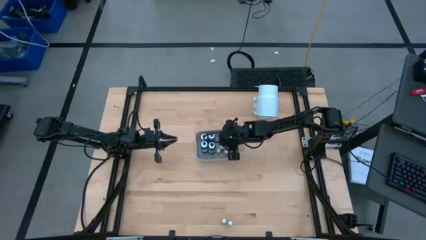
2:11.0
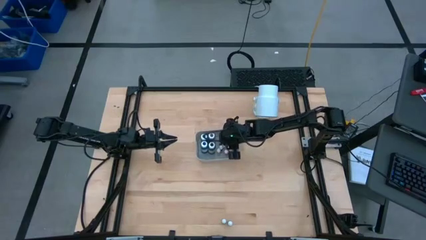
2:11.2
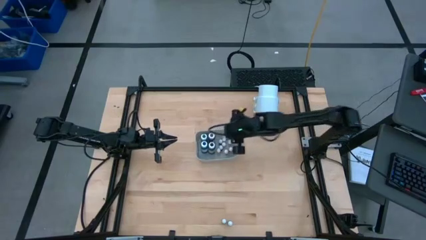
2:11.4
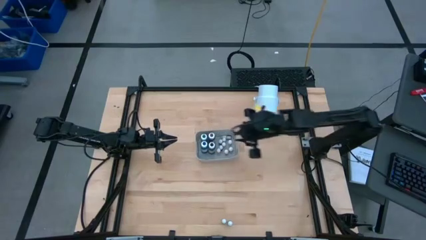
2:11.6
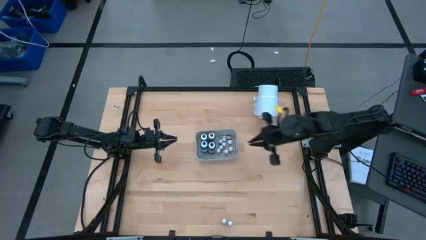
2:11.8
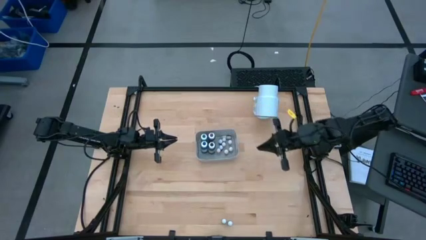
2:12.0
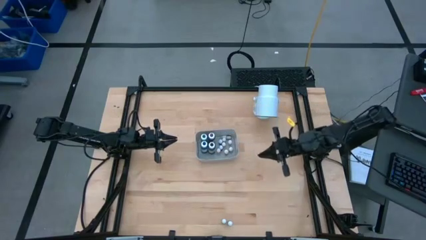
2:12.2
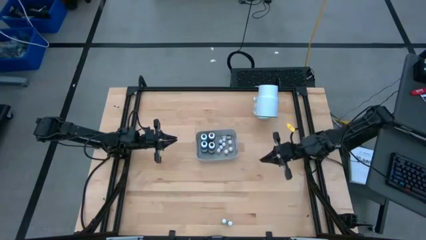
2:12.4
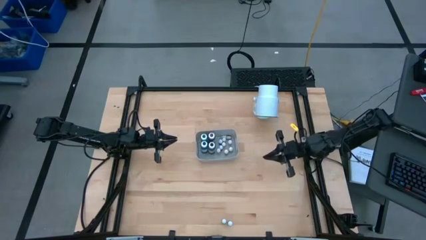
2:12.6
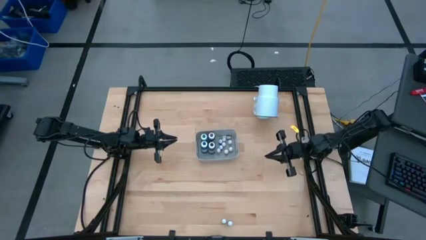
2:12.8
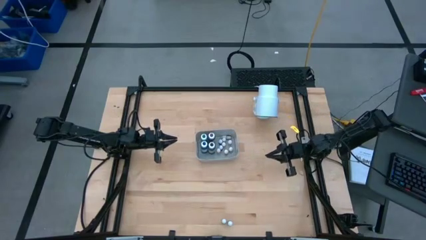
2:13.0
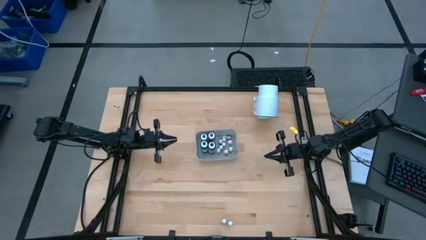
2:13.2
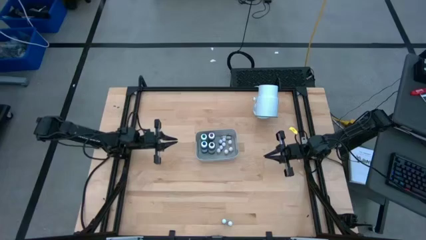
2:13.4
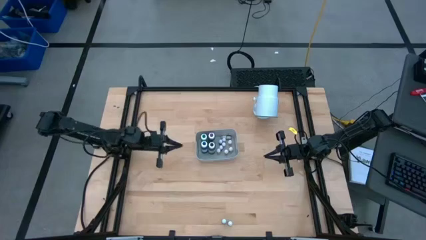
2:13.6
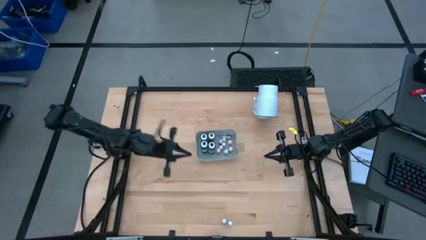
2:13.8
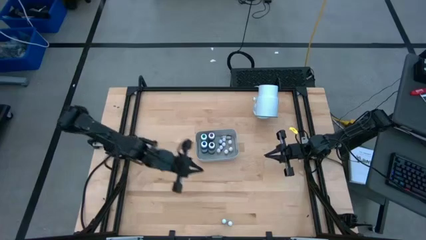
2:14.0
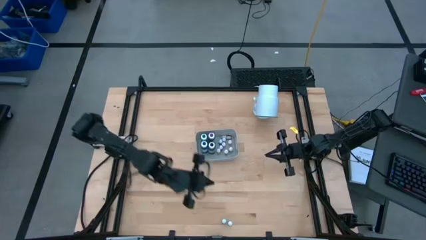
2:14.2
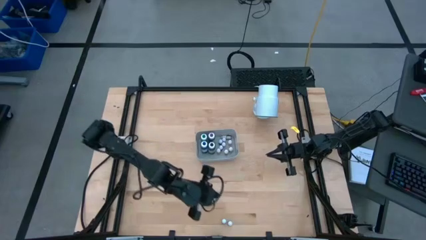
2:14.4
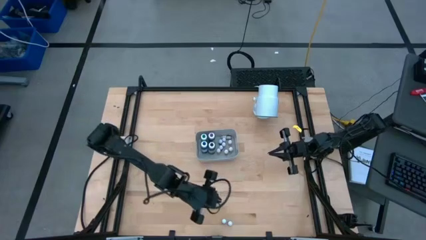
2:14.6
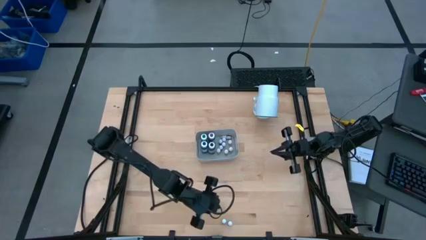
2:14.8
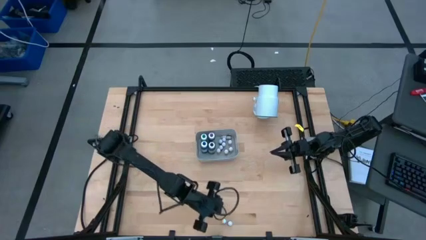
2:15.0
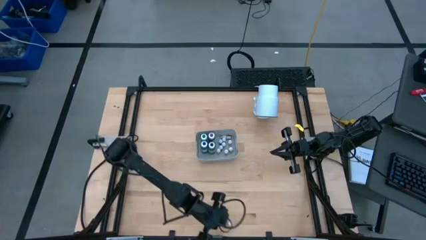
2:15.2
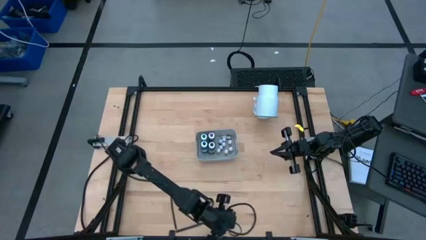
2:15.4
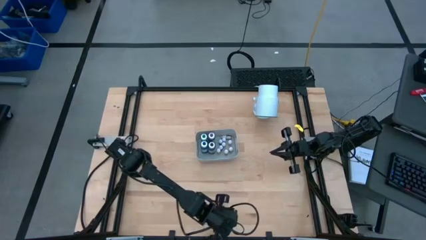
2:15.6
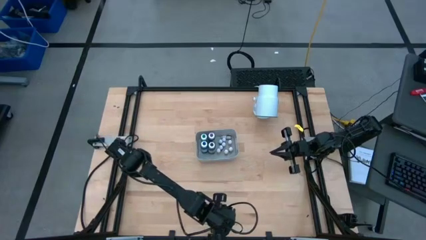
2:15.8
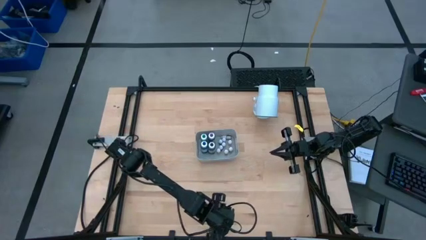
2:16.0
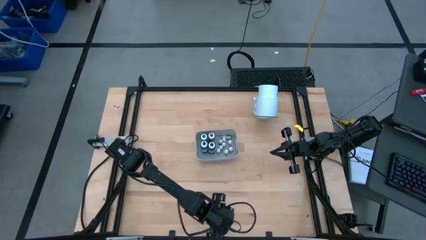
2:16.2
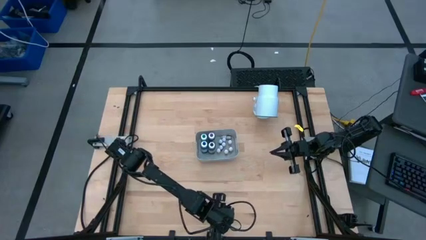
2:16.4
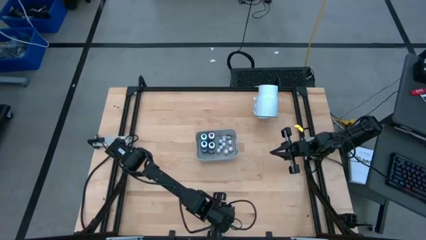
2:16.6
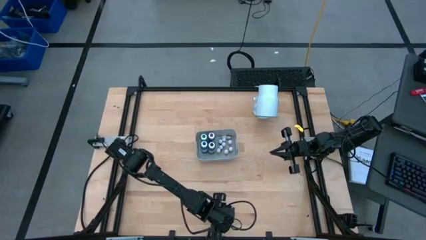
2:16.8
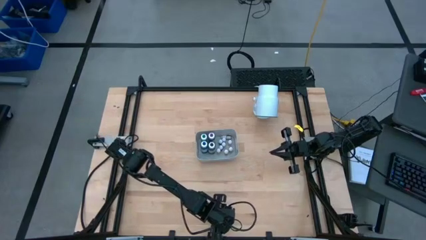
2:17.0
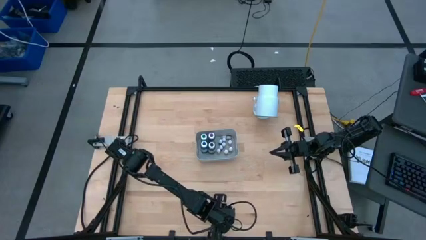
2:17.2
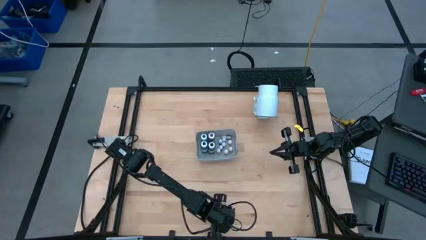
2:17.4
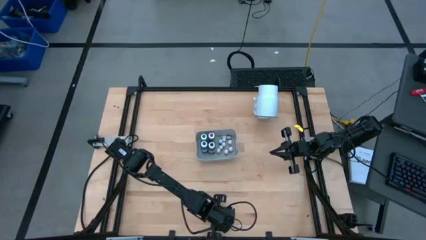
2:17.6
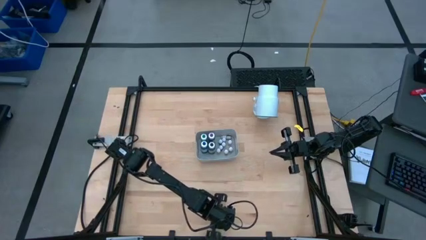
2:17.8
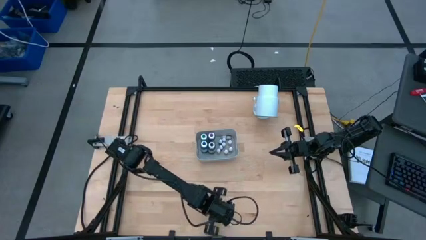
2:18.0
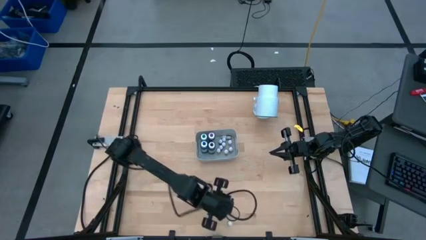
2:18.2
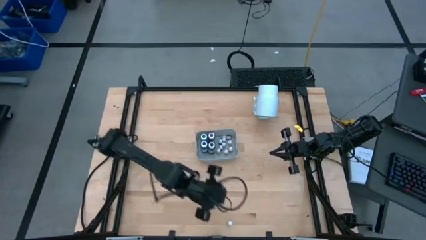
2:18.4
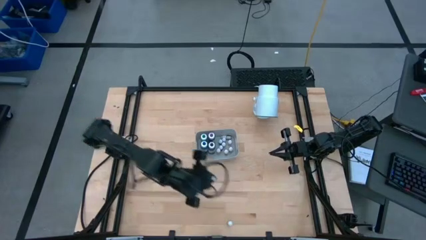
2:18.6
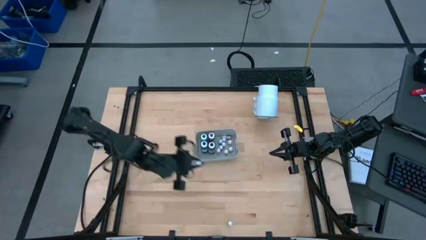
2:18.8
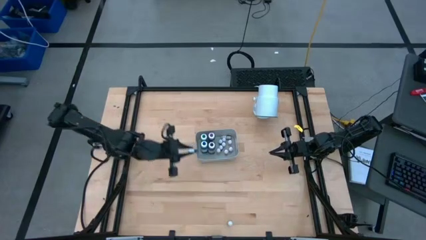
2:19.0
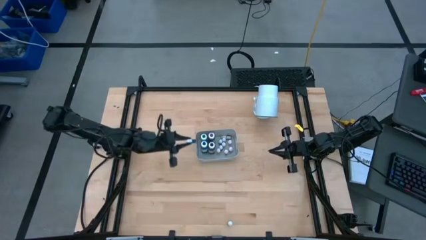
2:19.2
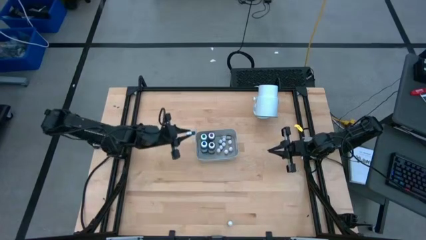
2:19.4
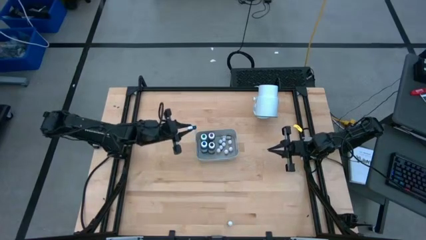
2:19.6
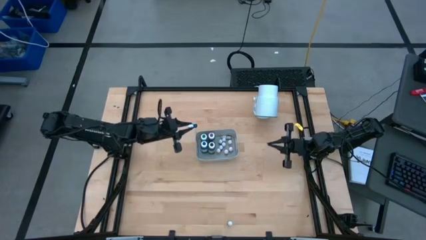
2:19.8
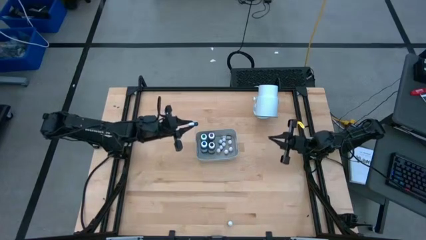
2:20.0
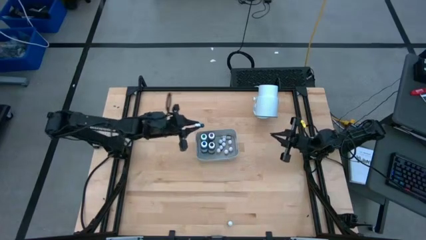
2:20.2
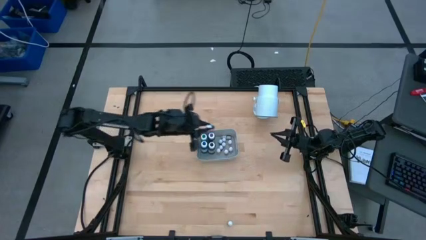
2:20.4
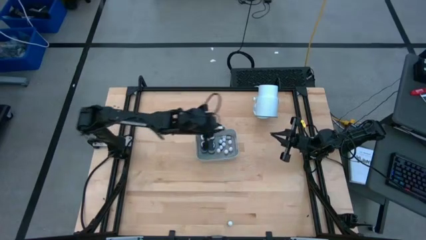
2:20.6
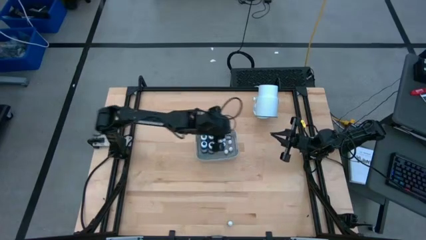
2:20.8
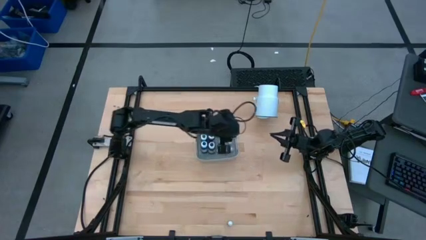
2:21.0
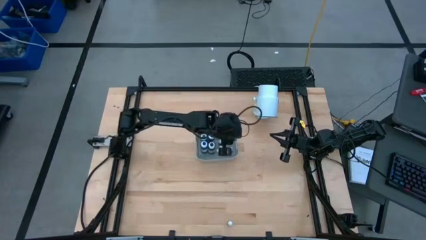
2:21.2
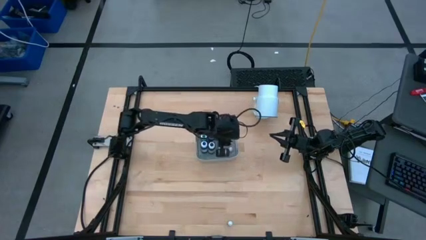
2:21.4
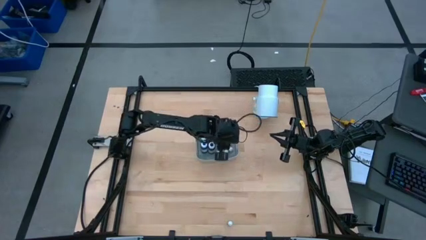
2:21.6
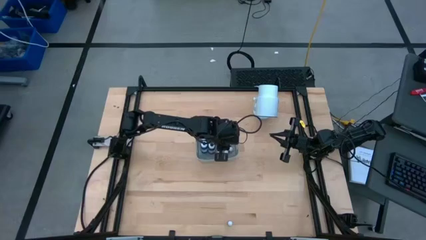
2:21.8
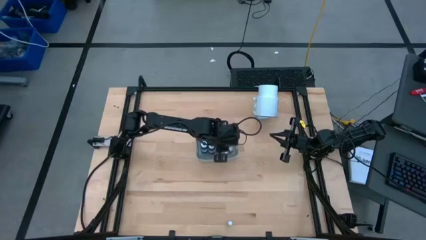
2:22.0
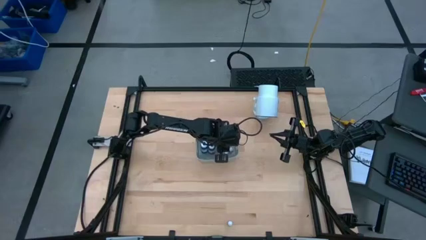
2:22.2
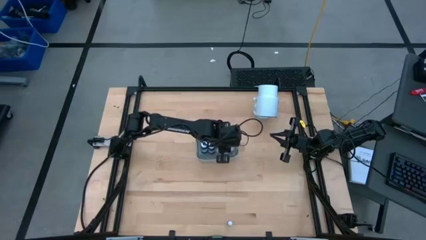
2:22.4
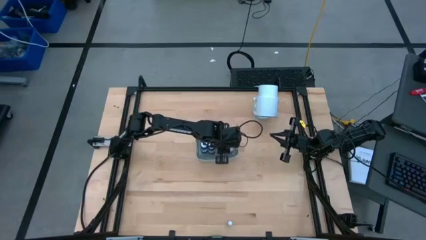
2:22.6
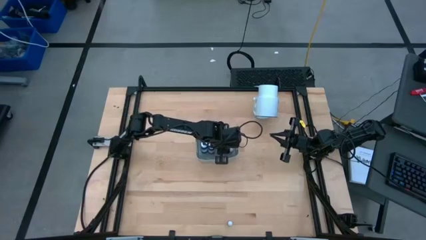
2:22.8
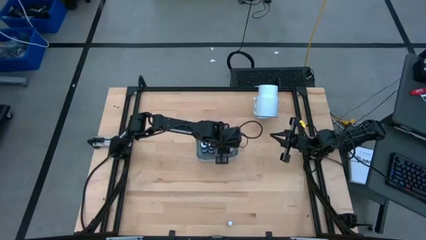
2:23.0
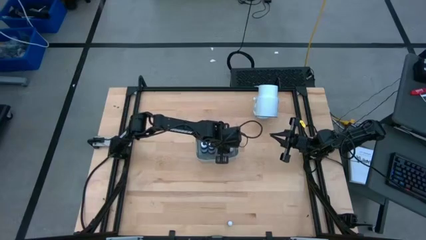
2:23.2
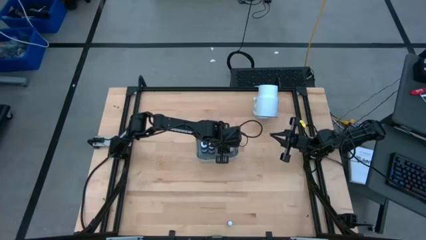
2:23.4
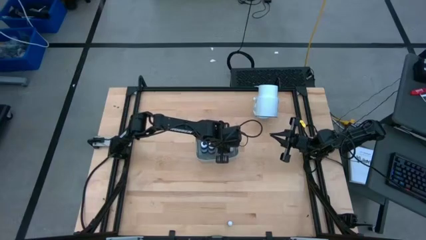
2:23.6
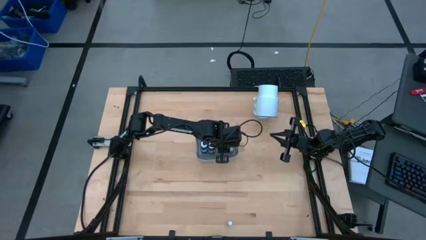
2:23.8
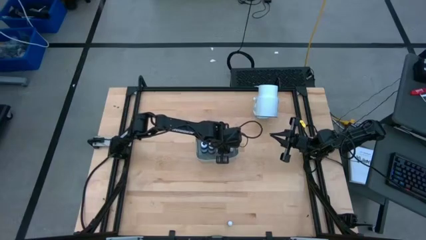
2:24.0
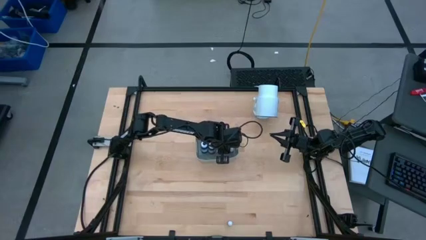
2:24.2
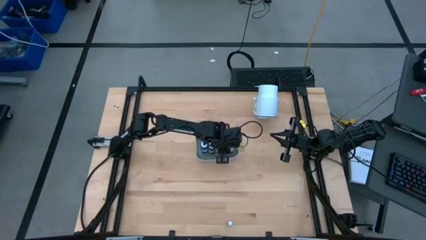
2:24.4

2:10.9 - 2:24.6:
Task: Pick & Place food coloring
Put the small blue food coloring bottle into the gray bin

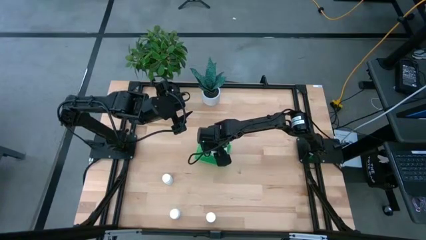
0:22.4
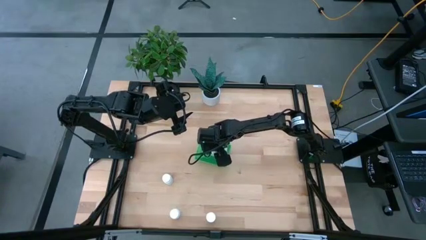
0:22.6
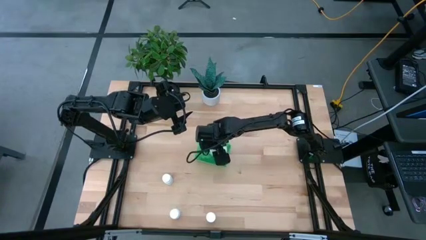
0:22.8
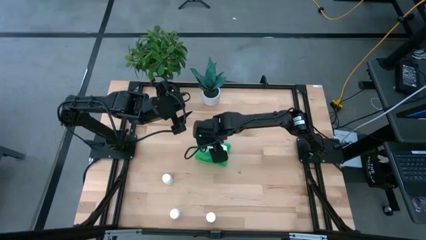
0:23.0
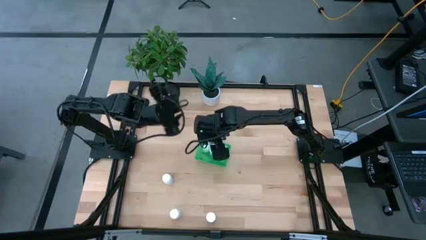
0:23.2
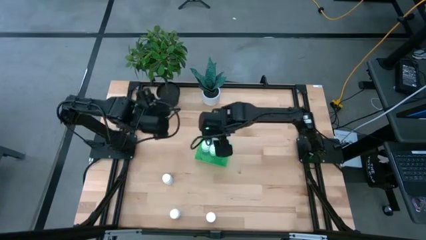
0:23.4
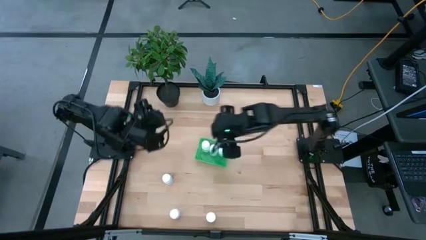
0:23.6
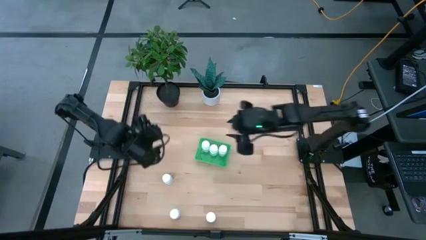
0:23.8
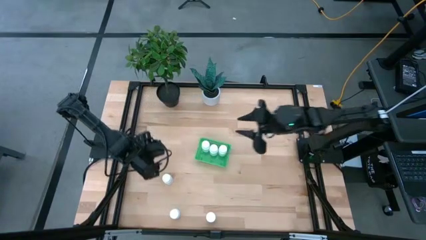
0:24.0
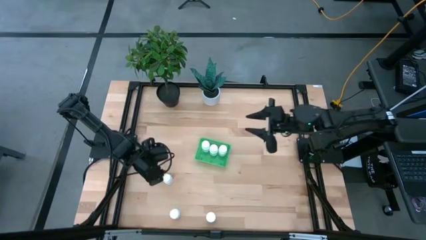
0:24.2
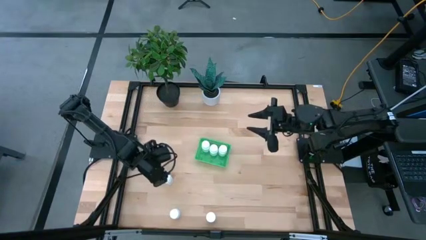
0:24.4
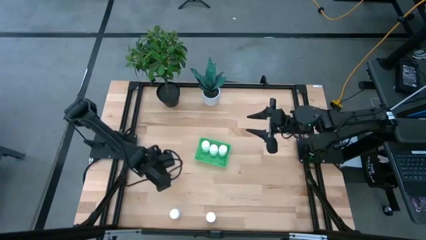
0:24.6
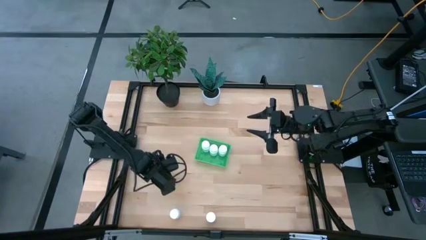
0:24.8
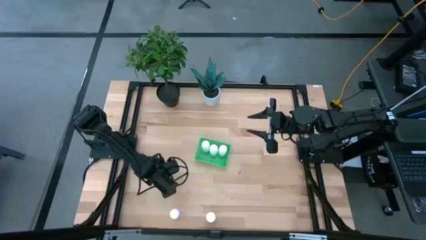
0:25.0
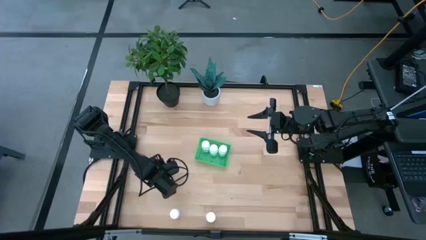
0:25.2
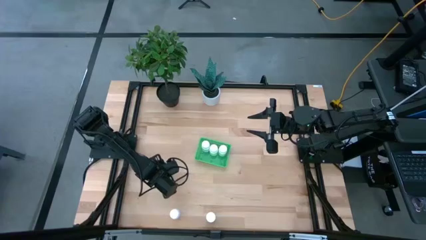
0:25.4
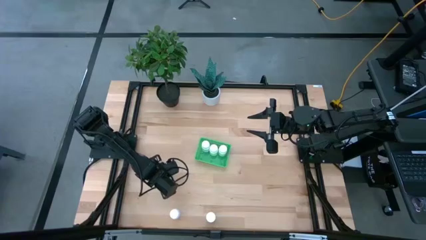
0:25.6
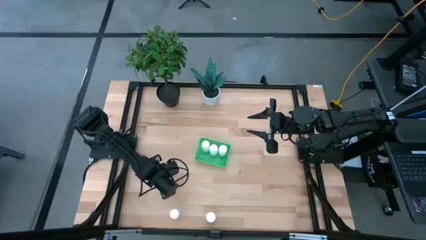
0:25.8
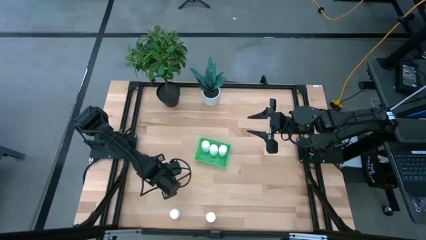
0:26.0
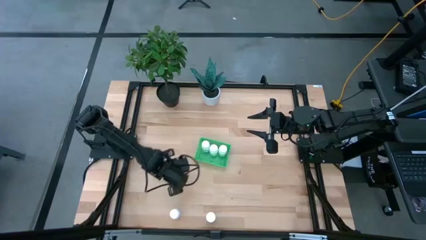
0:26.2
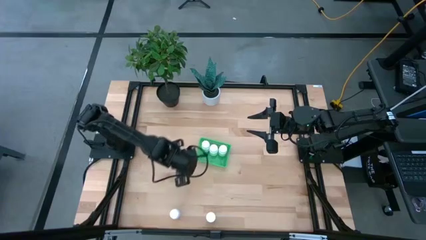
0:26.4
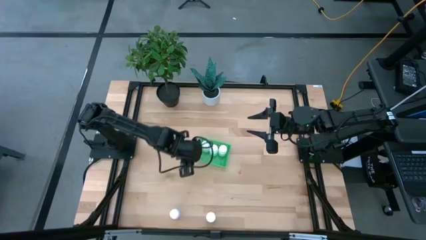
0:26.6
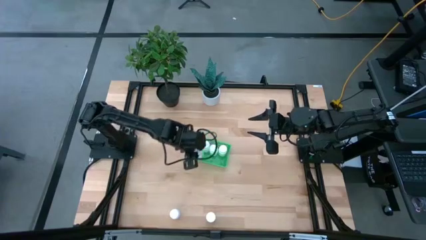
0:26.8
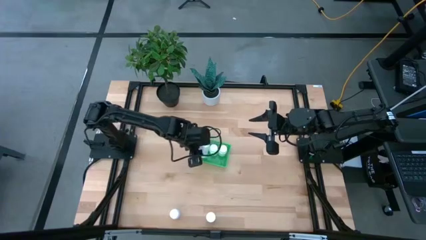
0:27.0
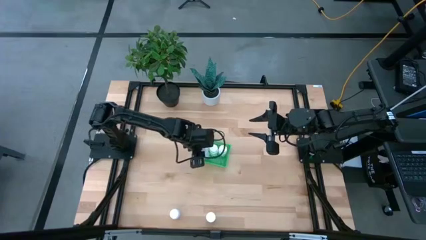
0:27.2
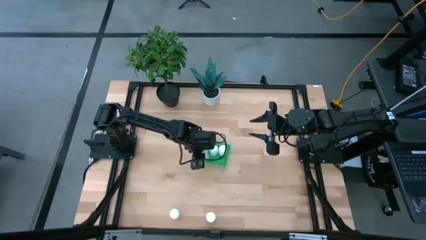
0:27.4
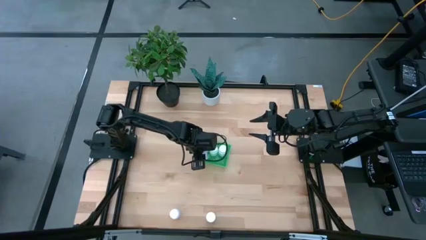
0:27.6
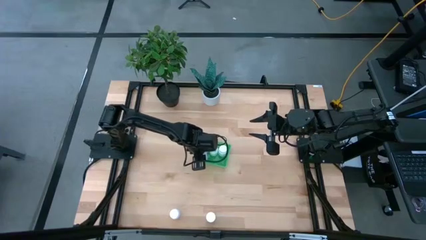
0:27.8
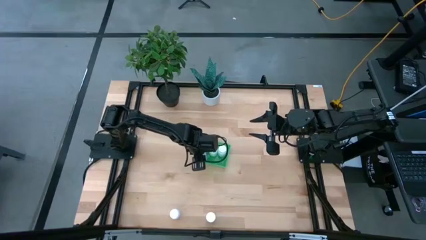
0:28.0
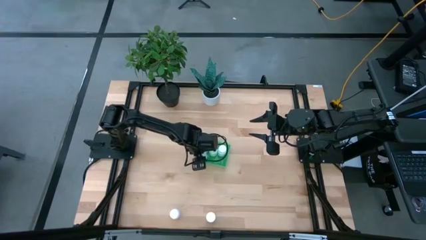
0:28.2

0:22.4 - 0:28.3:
Task: Pick and place pill bottles into a basket
Put the top pill bottle into the bin
